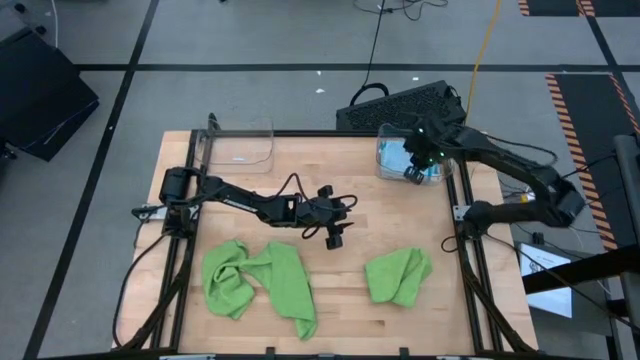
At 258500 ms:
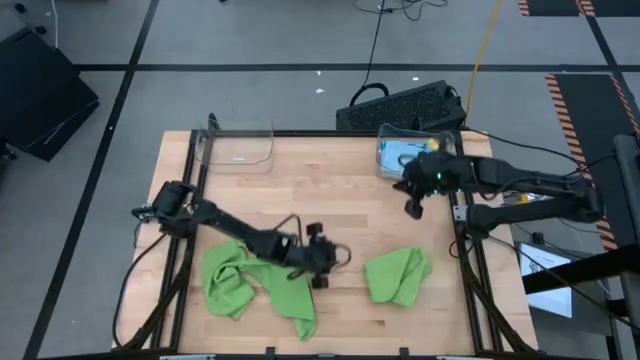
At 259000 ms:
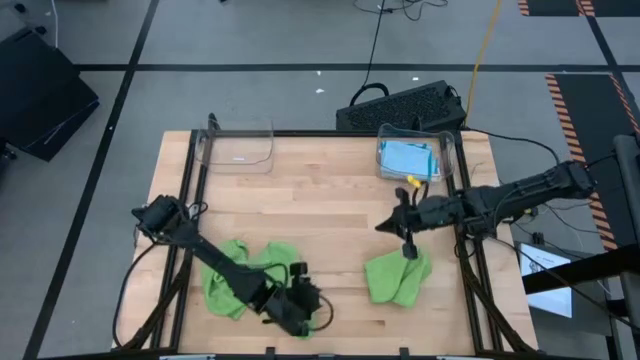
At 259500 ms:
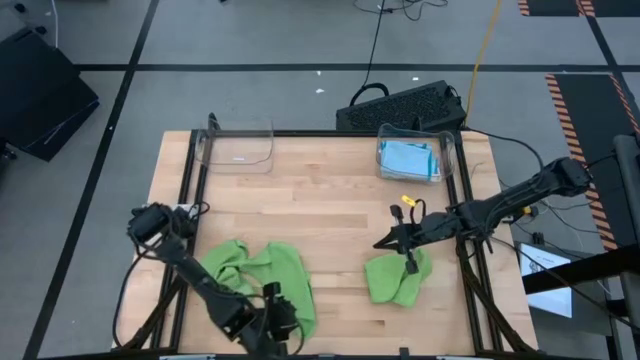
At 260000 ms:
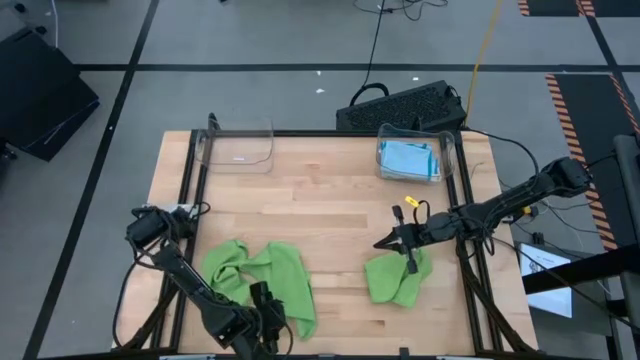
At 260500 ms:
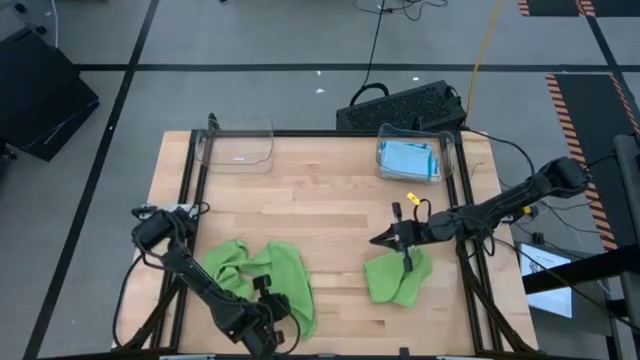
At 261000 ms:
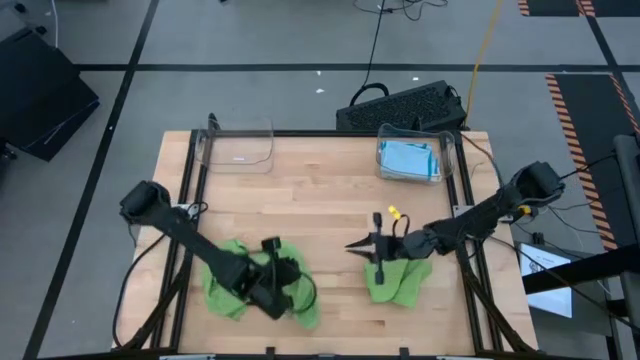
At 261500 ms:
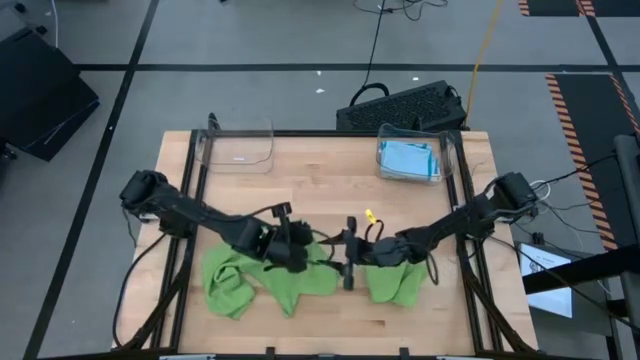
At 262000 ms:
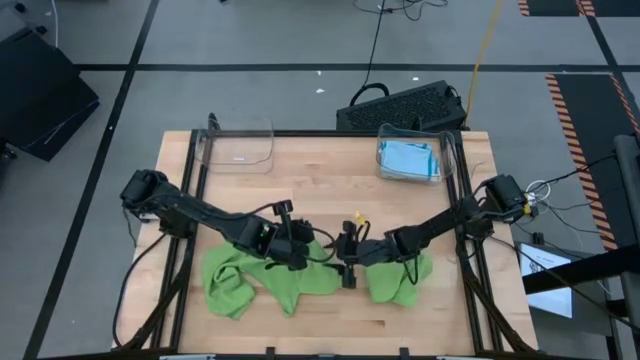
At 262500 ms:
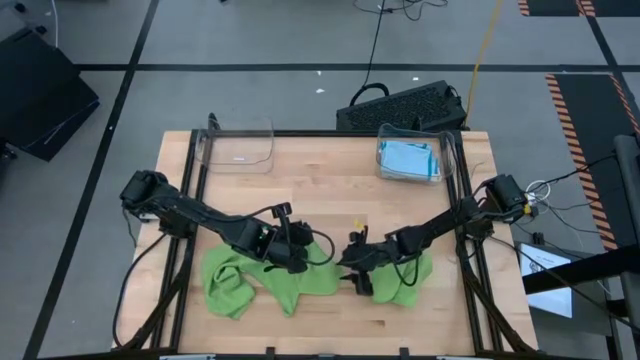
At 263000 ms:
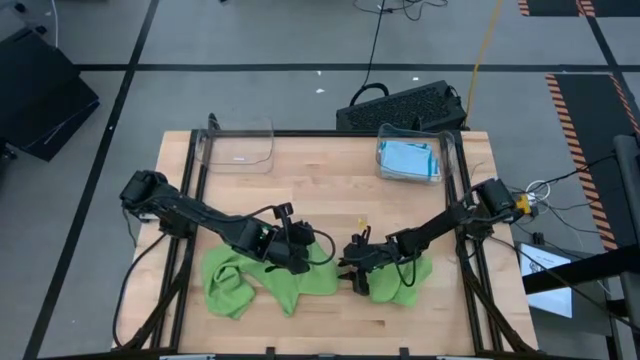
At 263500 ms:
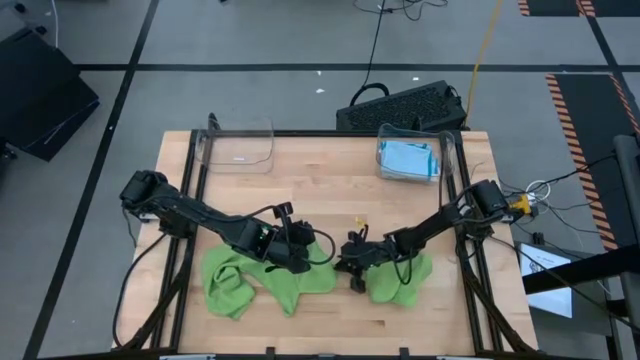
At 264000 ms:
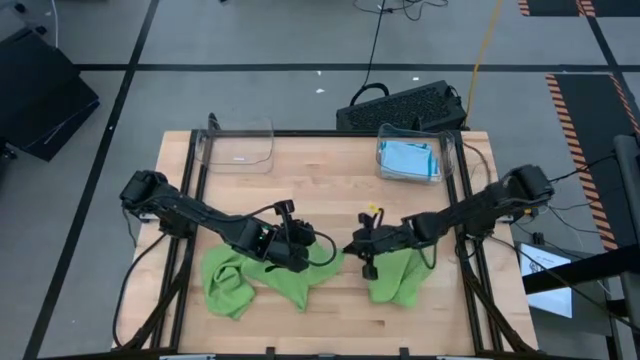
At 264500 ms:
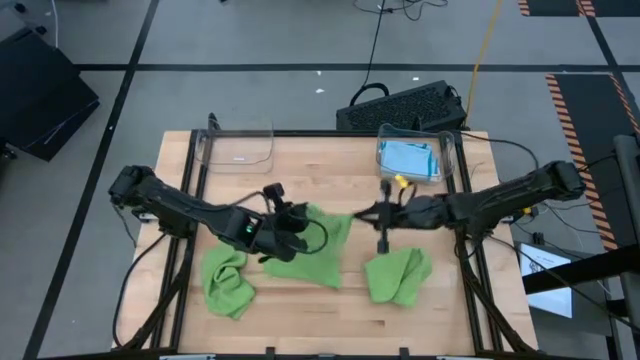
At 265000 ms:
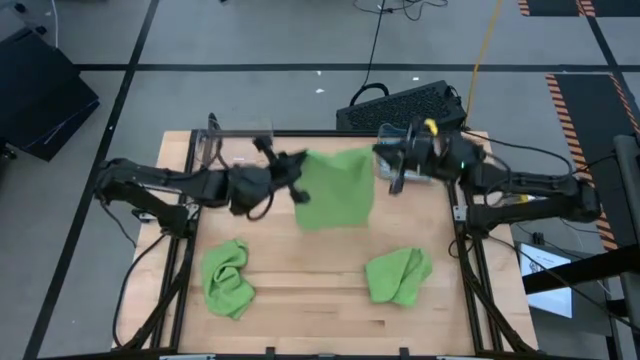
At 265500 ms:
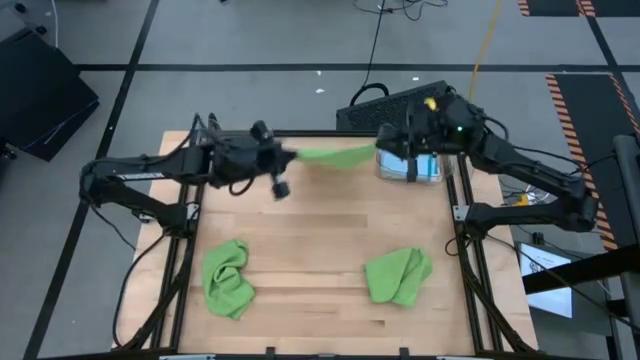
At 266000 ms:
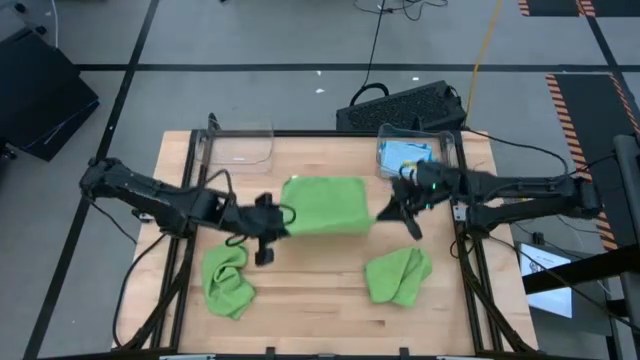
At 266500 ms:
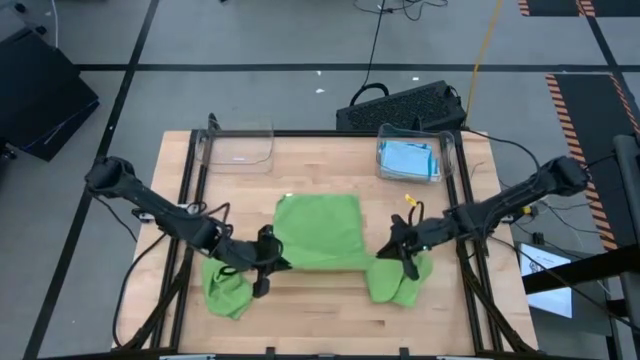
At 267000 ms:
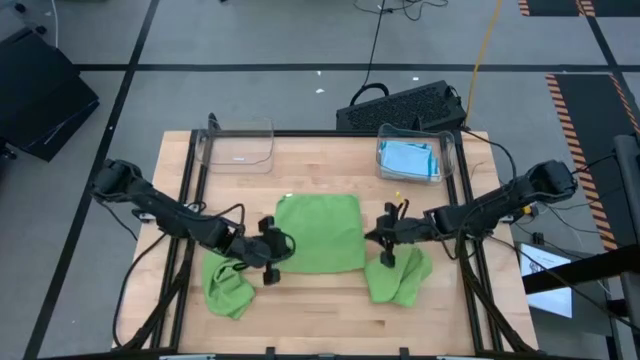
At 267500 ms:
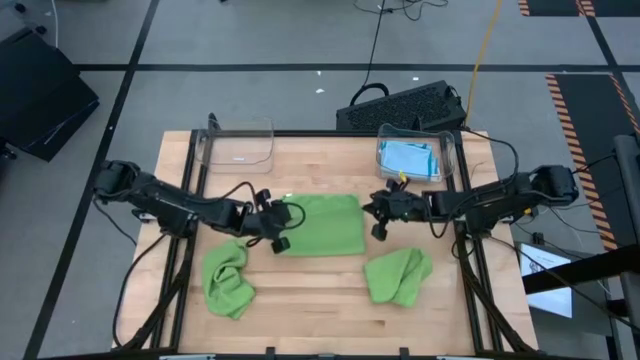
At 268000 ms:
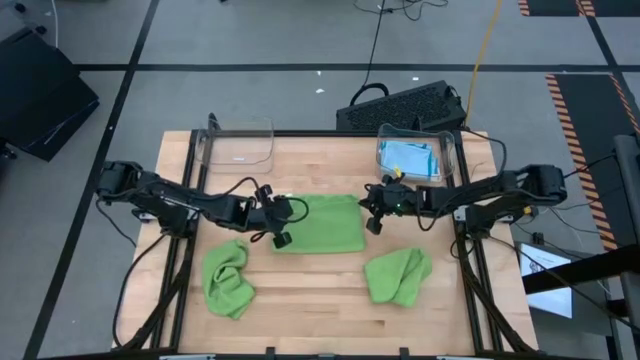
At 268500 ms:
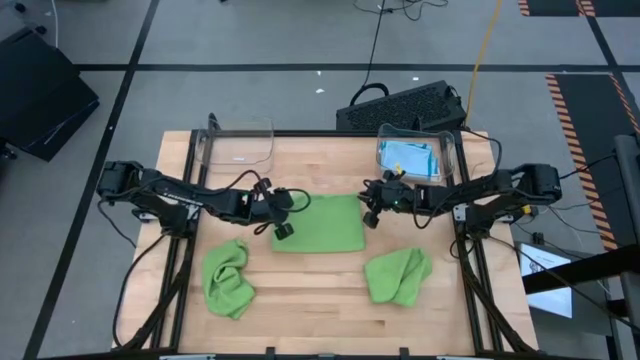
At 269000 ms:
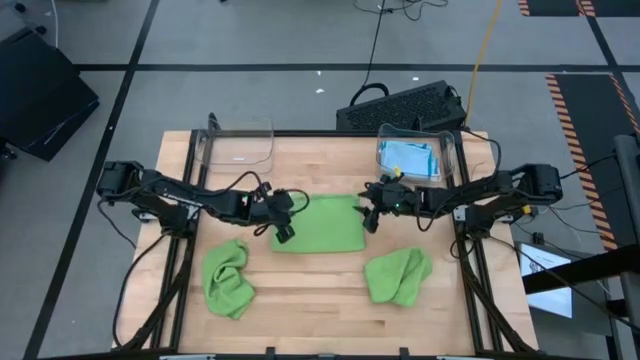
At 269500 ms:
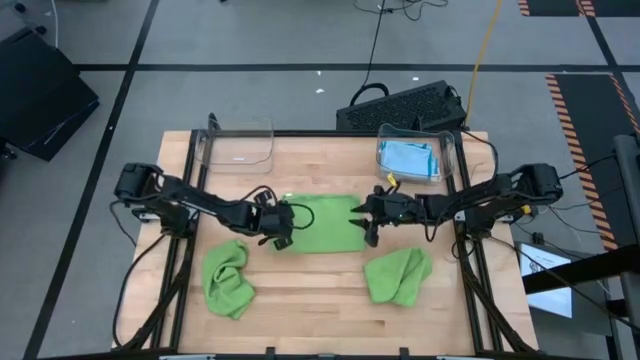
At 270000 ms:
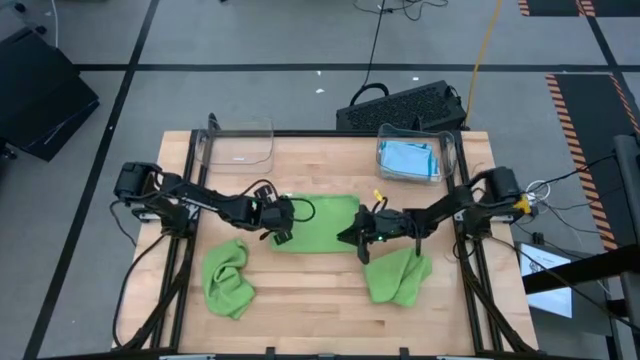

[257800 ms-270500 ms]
Task: Fold microfiber towels
Fold the center green microfiber cloth

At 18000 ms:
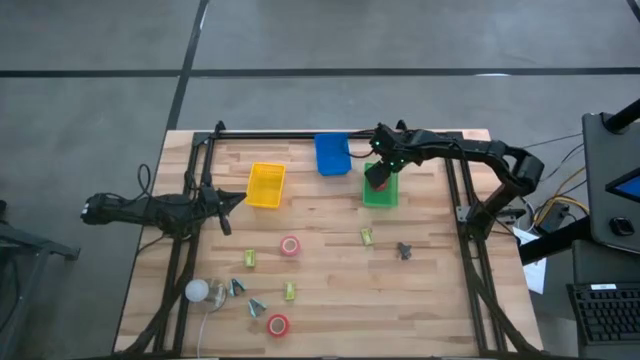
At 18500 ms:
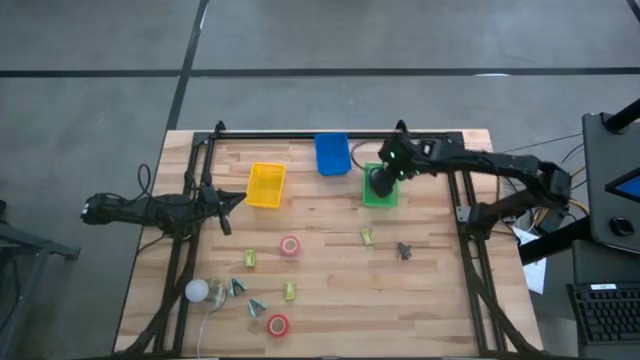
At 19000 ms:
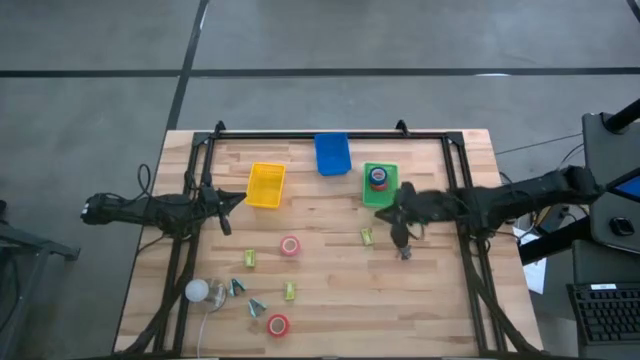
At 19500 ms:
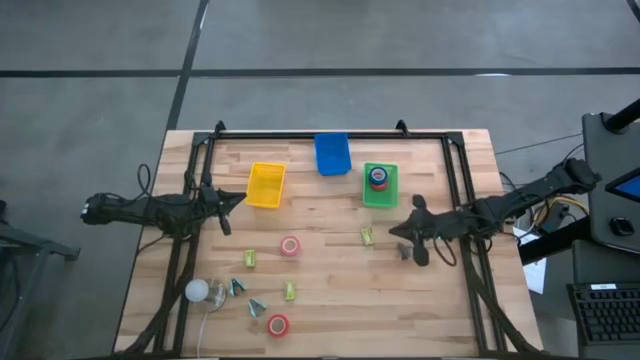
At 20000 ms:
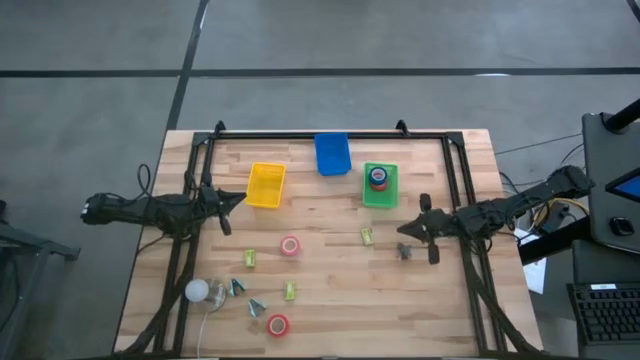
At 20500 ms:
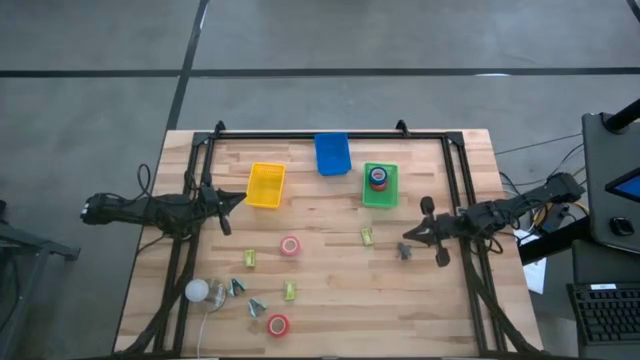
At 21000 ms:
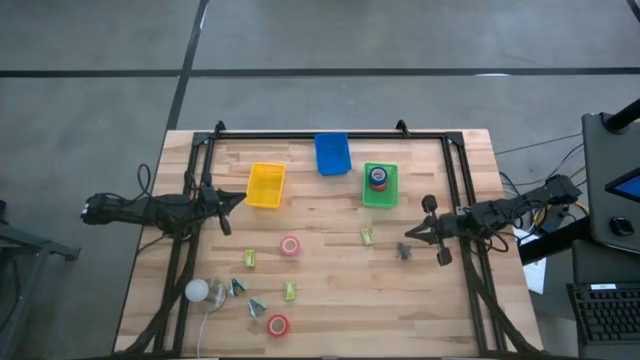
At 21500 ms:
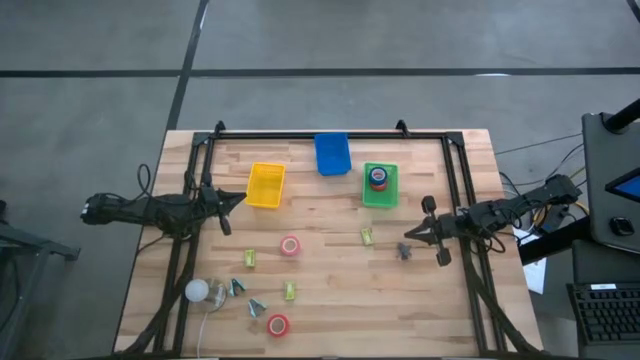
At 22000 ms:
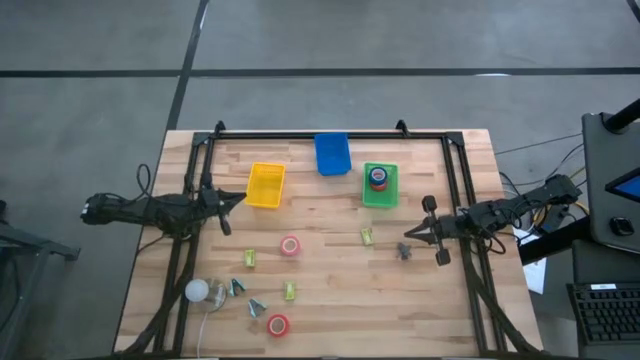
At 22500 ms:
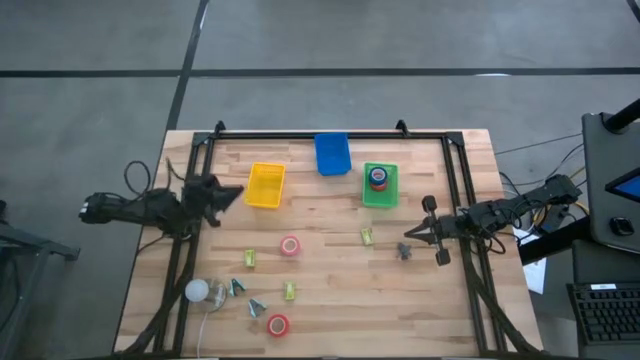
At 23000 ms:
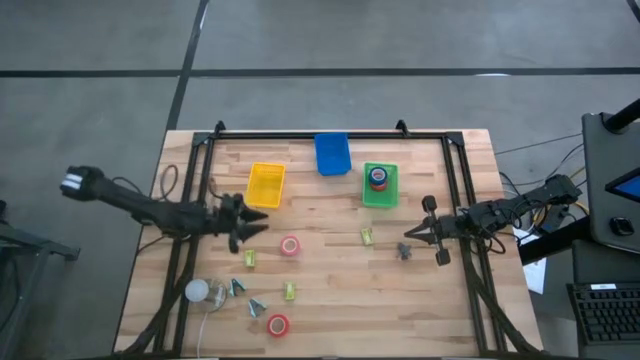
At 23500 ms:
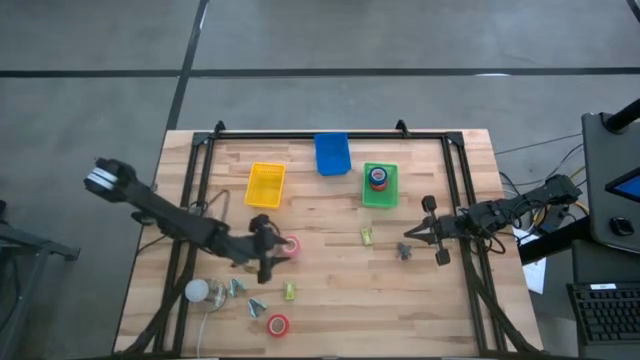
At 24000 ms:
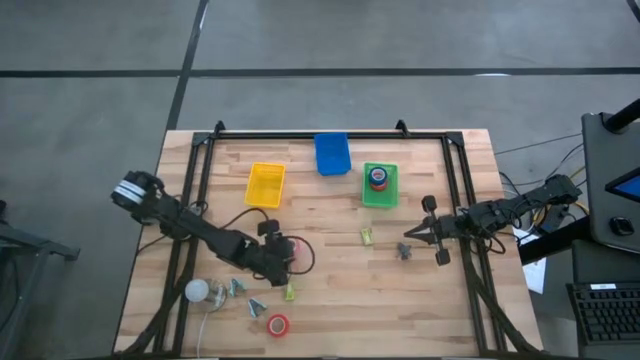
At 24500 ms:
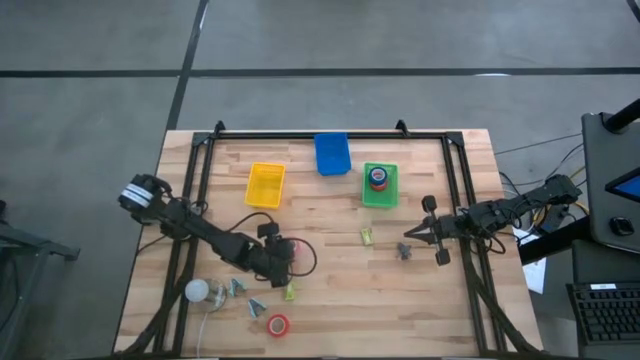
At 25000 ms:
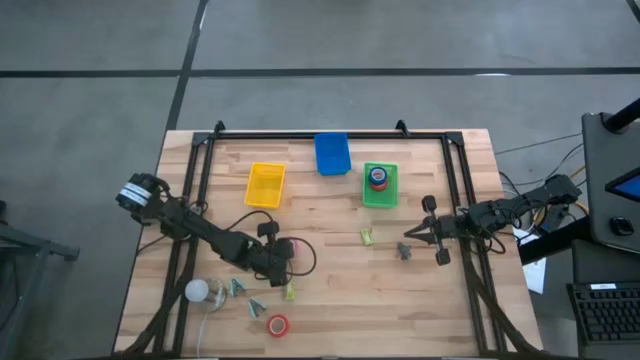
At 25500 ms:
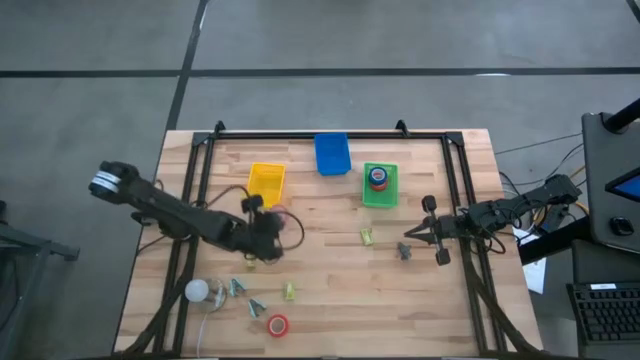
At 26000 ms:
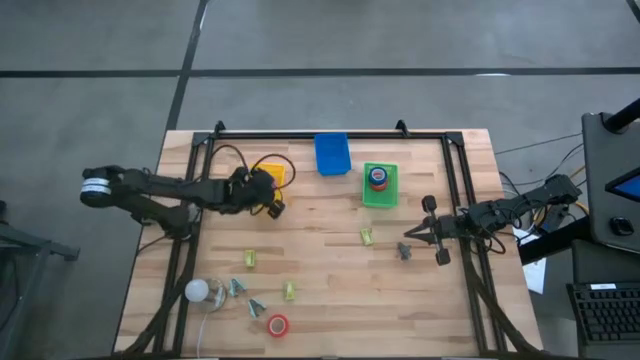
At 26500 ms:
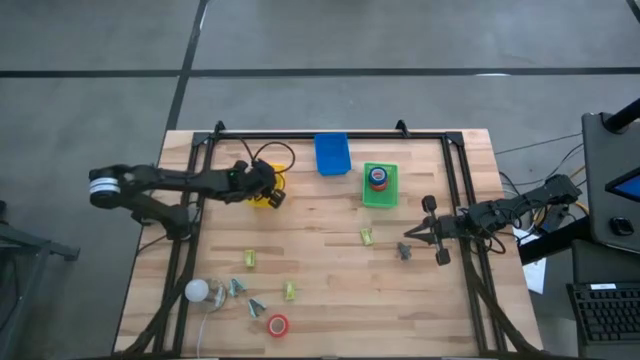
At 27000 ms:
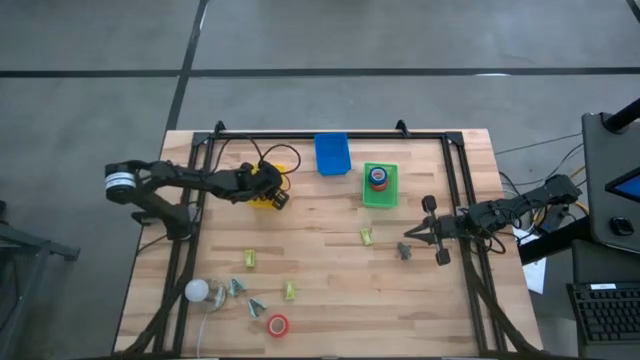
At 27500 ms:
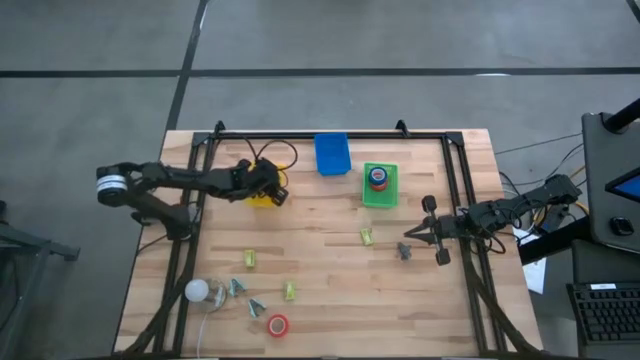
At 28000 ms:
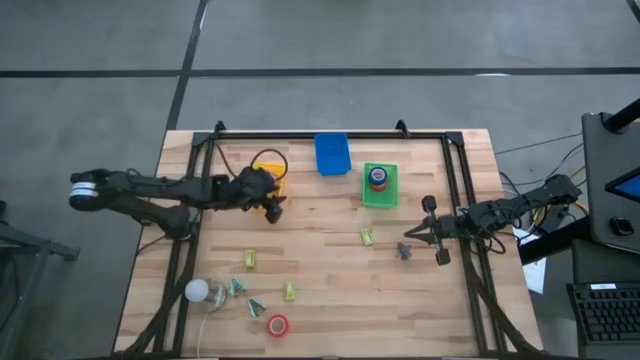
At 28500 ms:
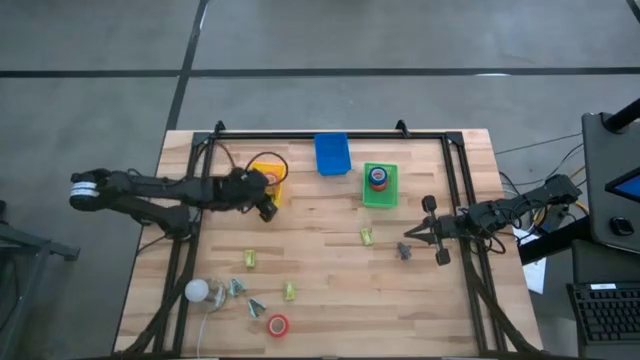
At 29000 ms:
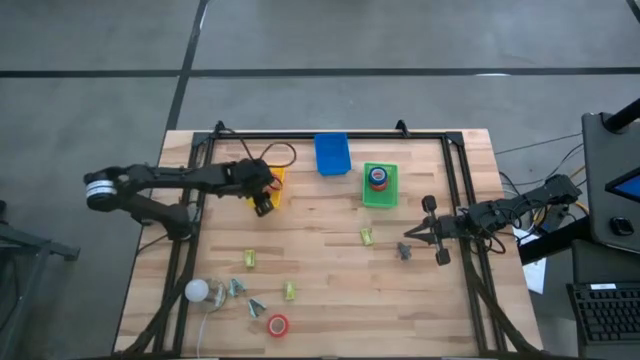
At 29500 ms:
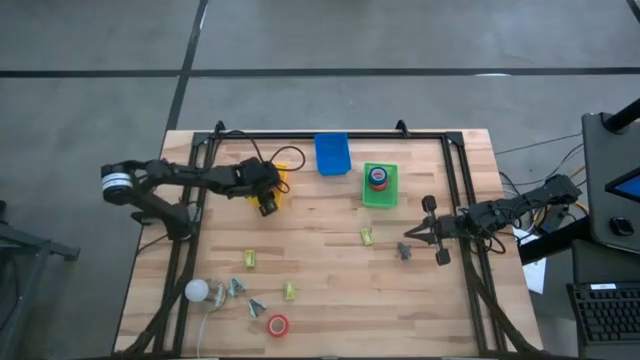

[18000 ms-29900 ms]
Task: Pick and place Stapler, Stapler remover, tape
Put the pink tape into the green basket
